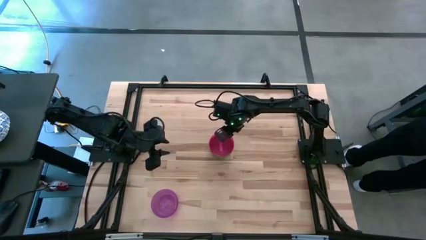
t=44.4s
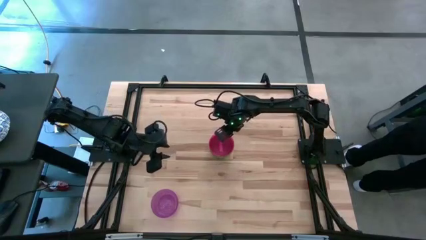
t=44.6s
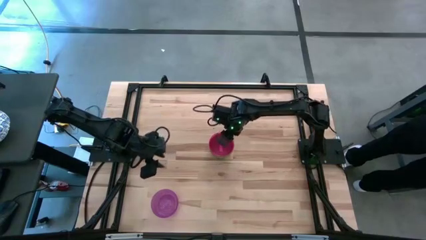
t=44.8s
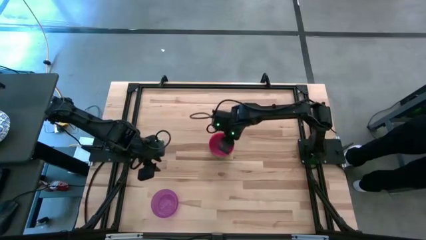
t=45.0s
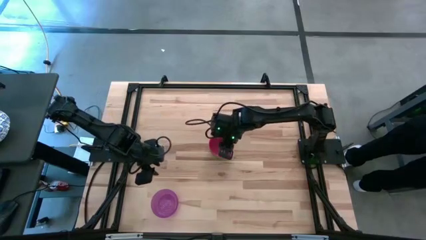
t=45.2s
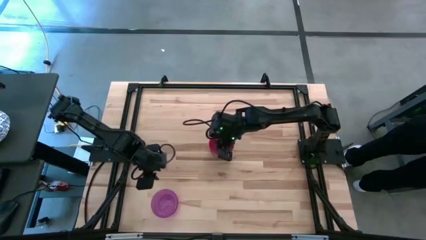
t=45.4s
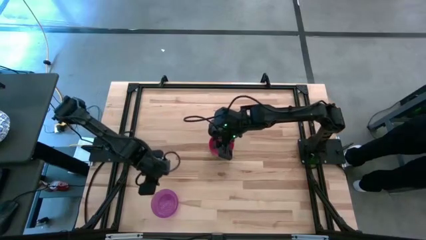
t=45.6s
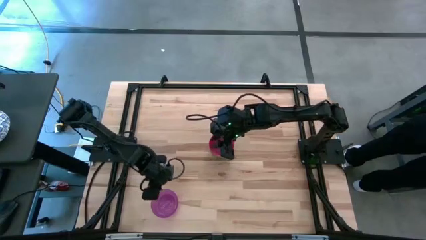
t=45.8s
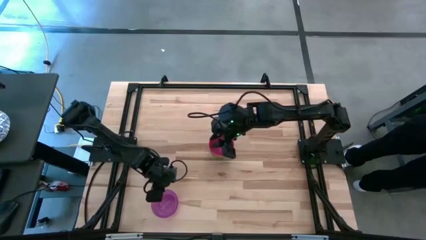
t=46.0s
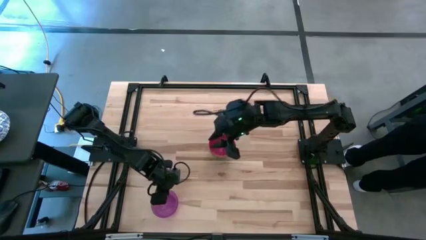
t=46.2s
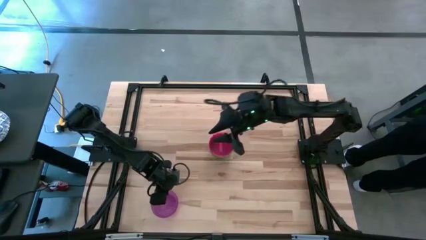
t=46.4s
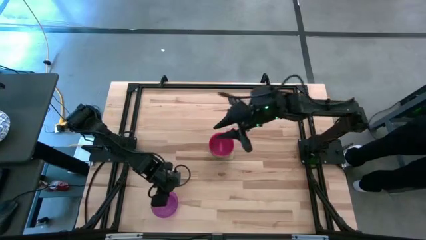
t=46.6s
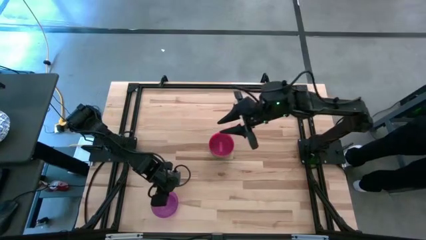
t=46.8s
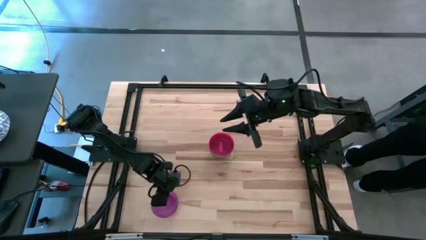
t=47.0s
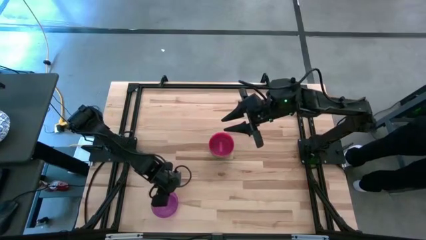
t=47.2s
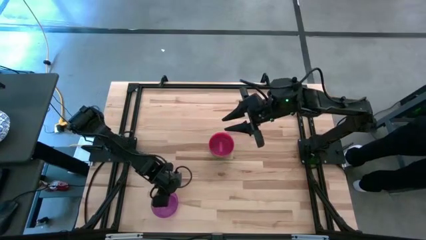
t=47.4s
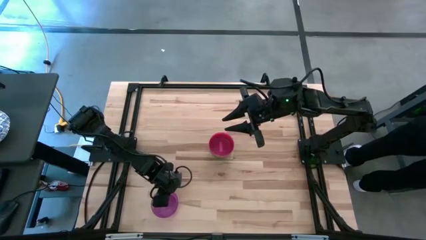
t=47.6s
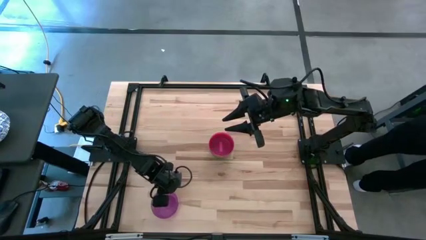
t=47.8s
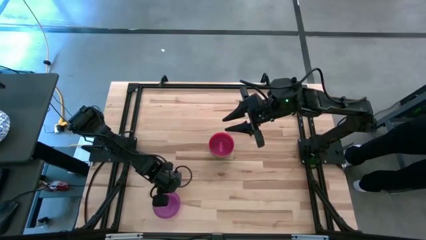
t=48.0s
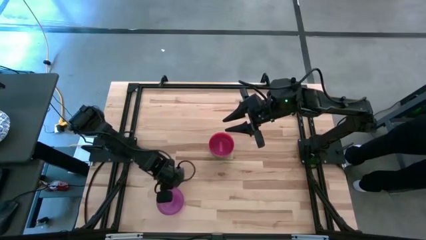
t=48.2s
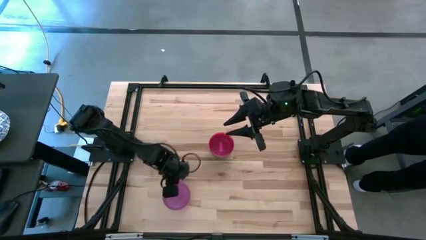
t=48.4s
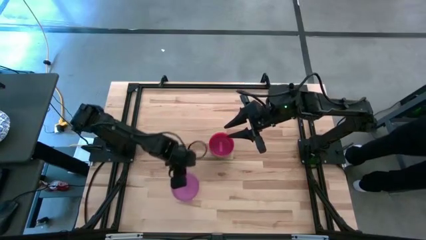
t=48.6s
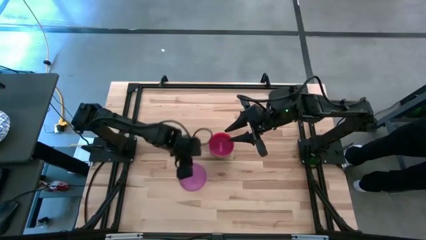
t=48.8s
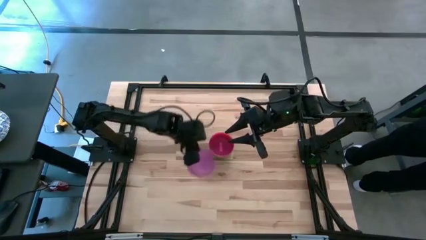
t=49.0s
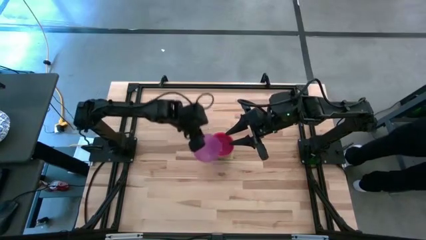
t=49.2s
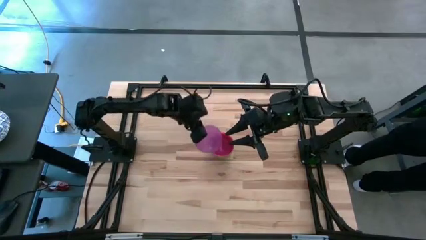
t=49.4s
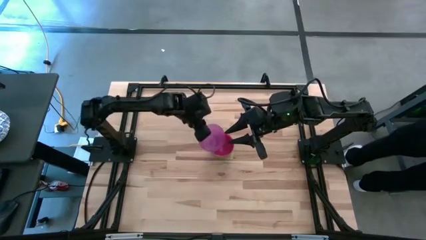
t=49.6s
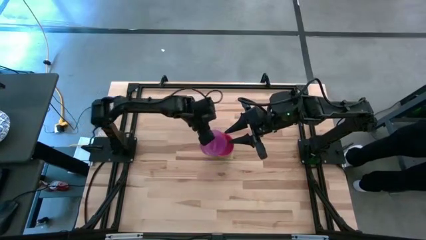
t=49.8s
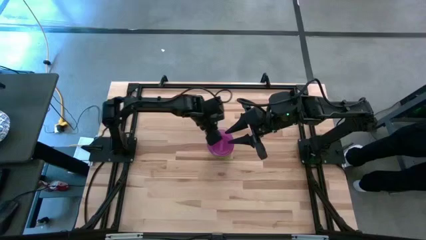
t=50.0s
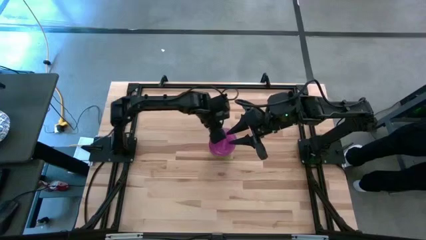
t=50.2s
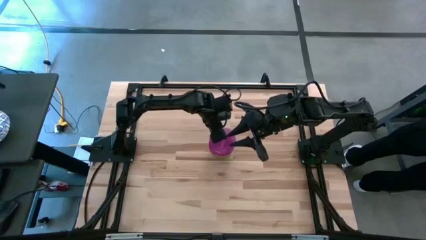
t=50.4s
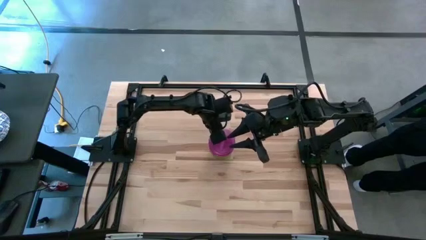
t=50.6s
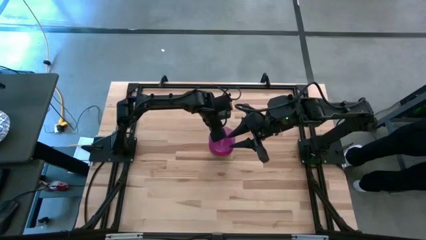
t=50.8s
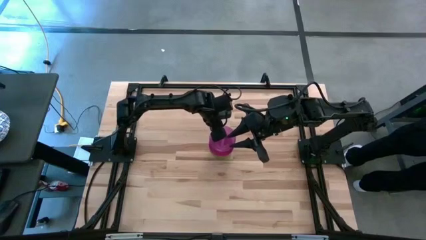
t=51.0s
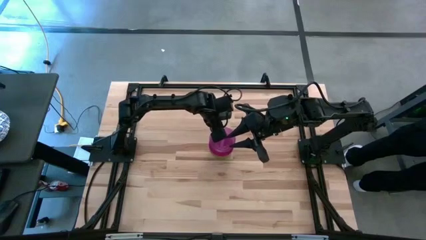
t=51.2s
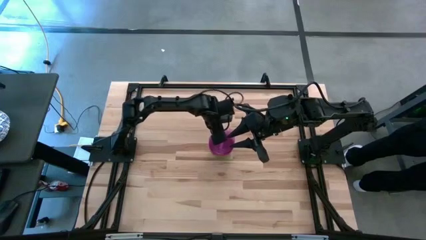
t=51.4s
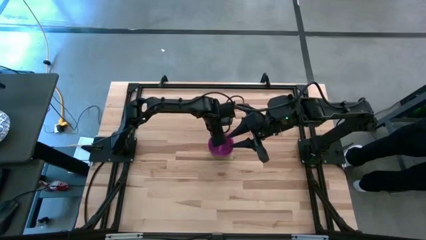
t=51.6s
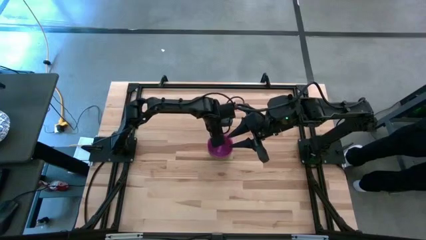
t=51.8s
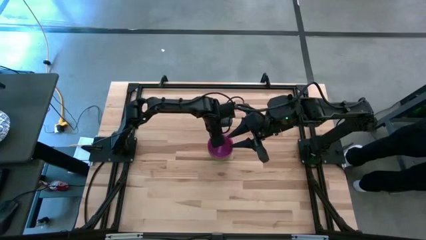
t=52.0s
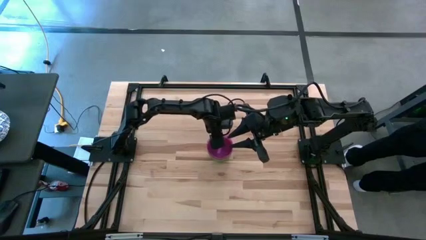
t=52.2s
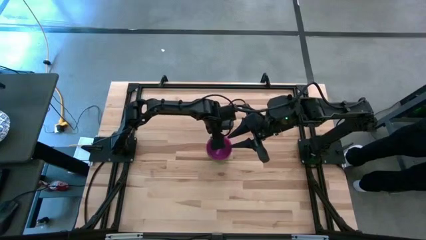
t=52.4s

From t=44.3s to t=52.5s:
Task: Nest bowls inside each other
Stack the violet bowl on top of the pink bowl

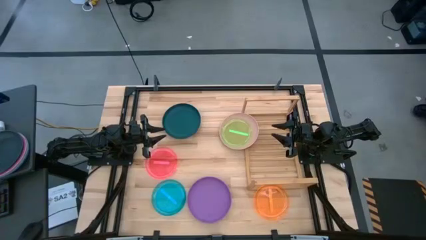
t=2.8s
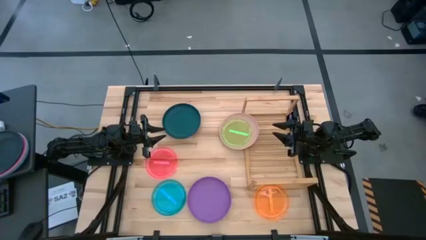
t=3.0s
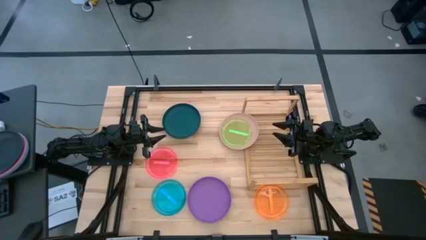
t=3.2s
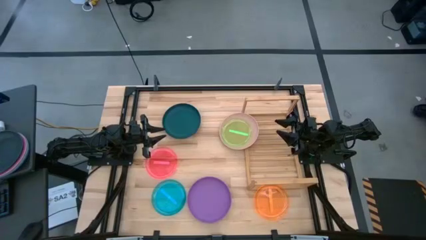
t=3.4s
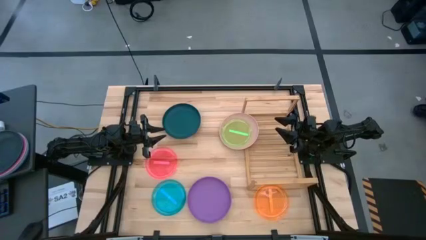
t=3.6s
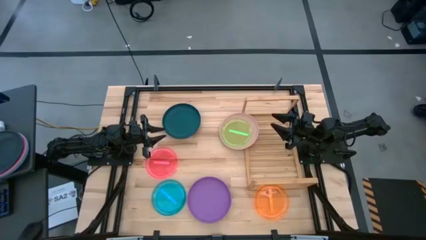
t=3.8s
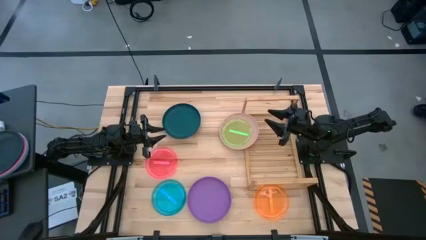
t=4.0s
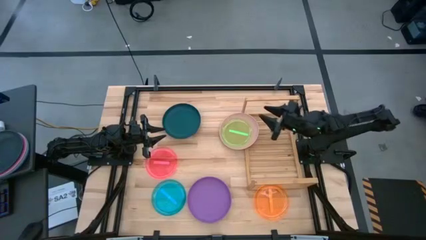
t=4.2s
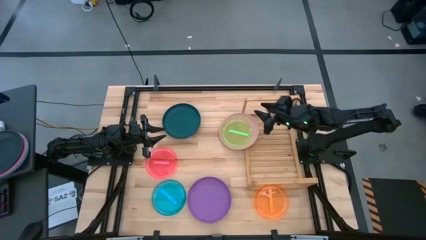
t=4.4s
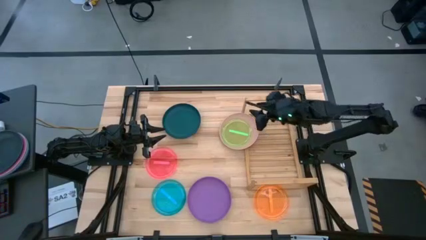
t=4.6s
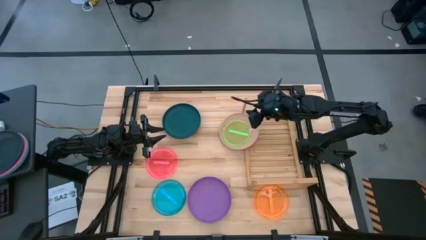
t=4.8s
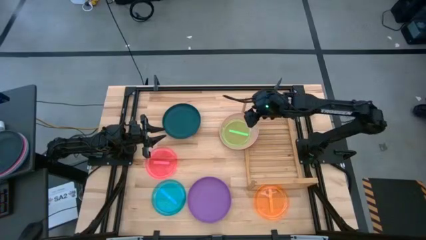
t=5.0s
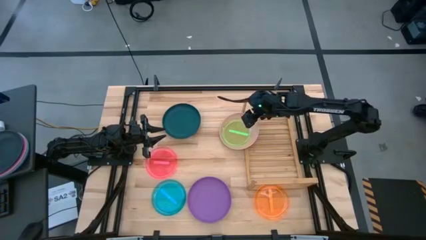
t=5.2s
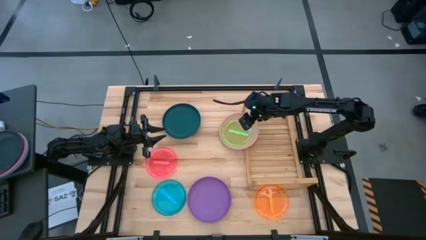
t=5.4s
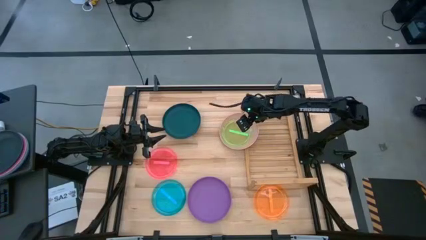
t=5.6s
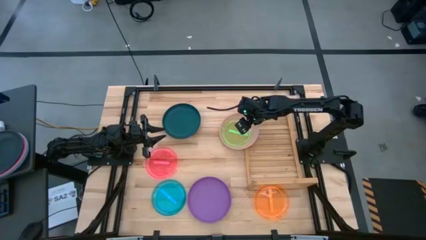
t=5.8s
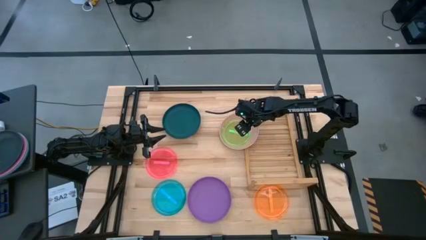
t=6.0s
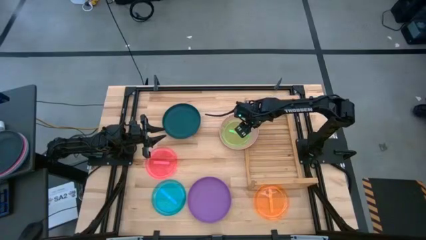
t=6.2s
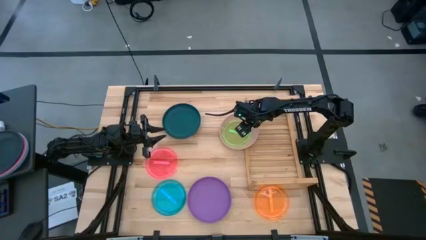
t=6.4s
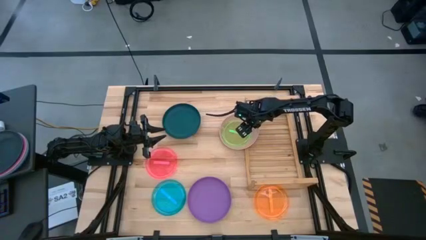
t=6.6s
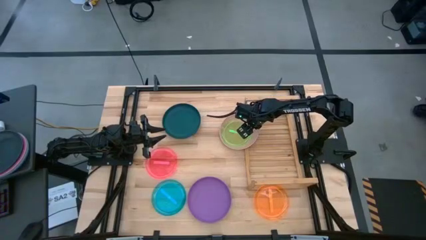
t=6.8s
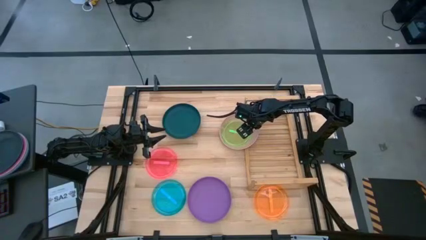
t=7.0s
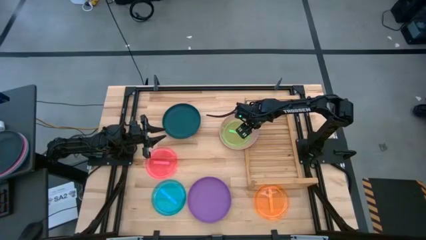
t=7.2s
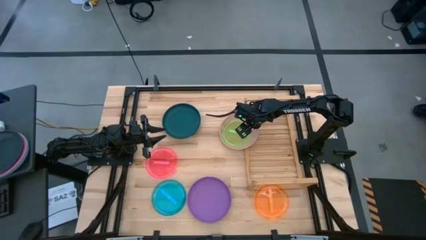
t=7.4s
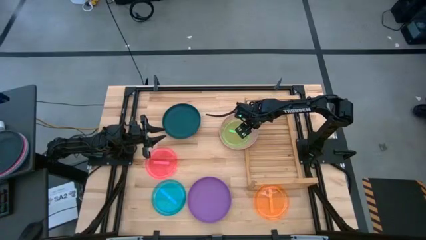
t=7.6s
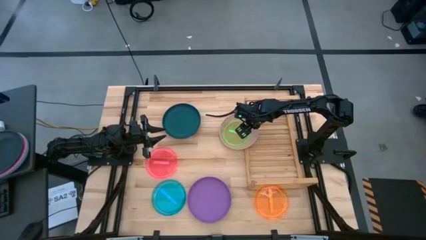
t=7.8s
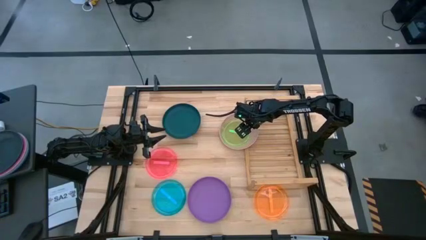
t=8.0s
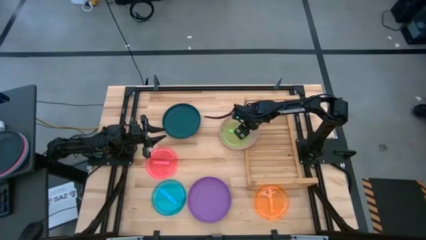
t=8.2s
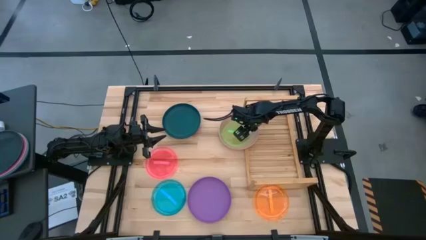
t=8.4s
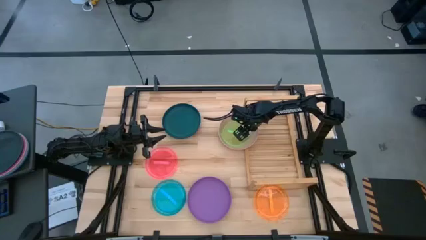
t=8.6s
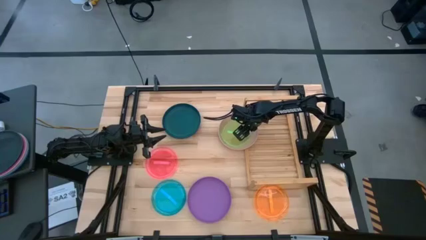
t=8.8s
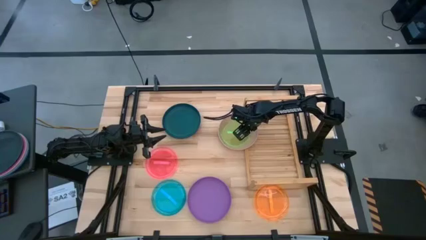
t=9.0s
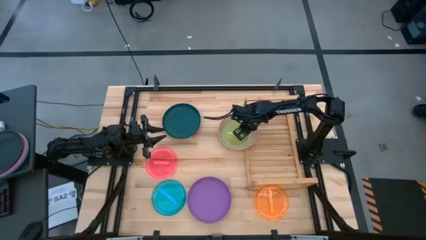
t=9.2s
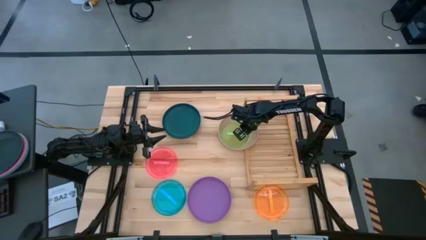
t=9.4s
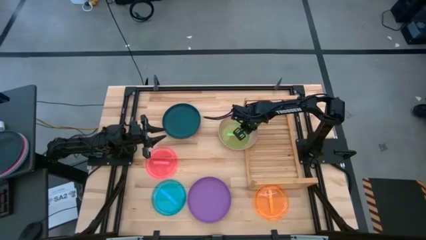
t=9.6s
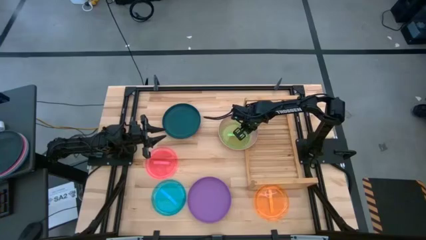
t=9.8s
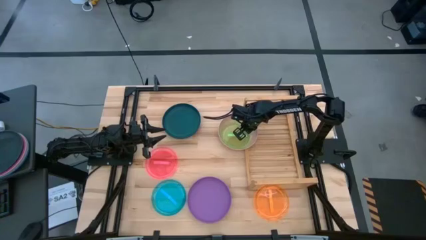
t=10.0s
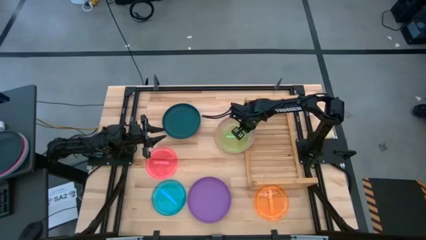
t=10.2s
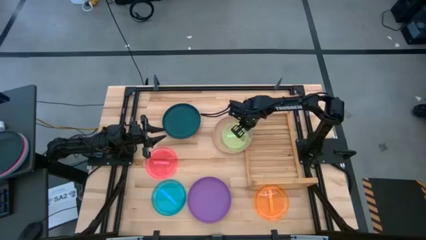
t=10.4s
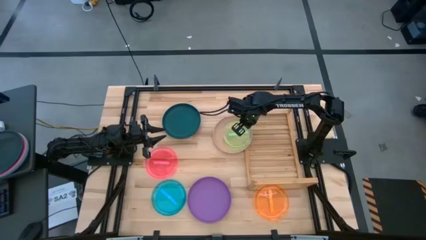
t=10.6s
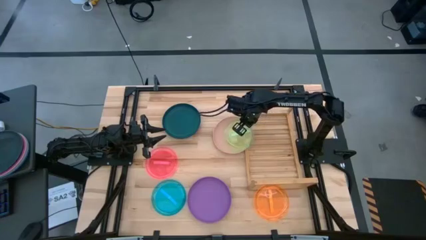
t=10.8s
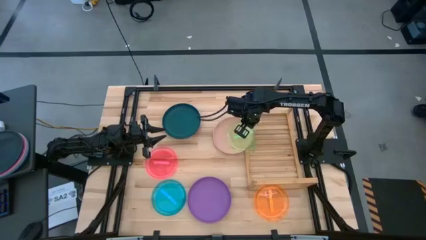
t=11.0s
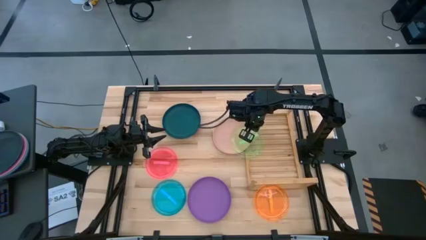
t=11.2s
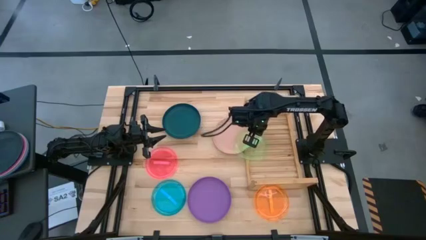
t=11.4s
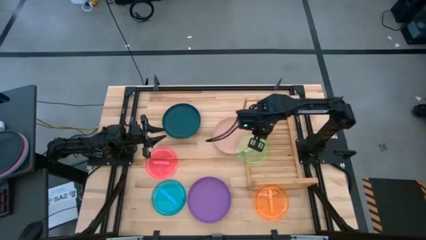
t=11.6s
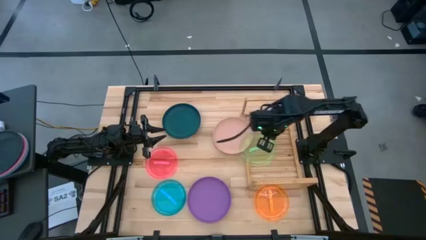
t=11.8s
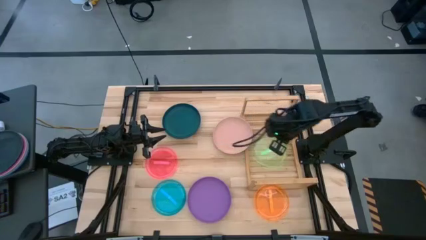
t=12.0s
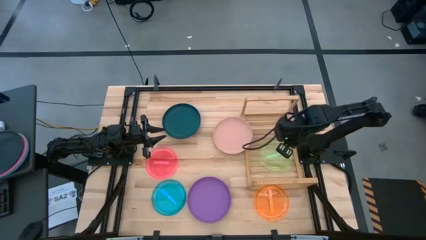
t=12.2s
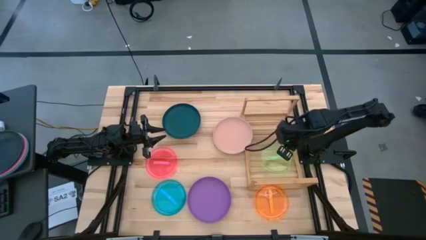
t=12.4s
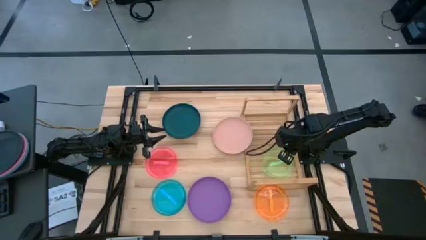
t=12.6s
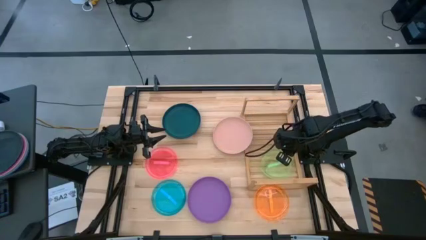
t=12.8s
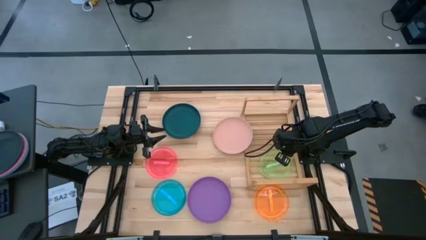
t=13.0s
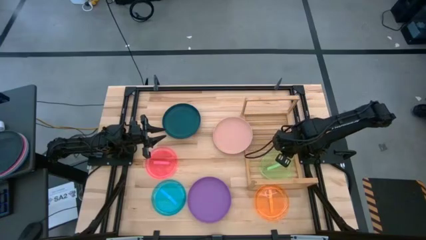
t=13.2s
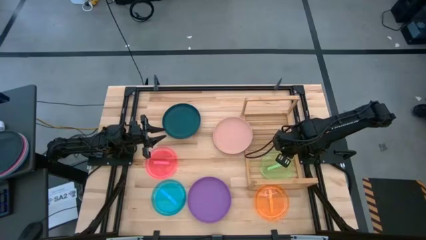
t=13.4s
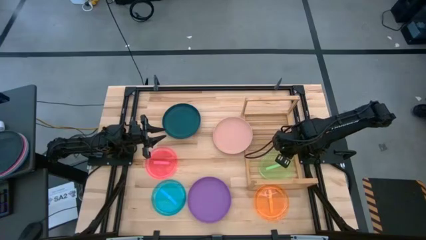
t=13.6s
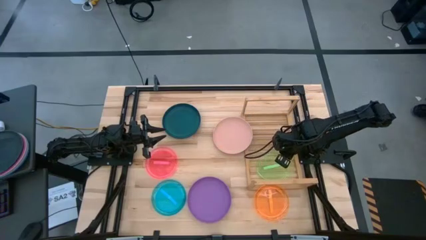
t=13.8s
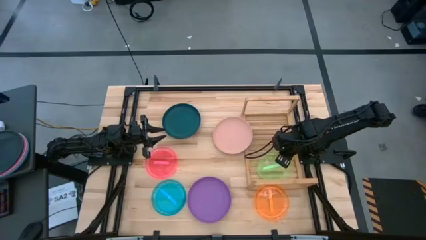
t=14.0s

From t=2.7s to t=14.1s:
Task: Place and stack plates onto a shelf
Put the green plate on the shelf
